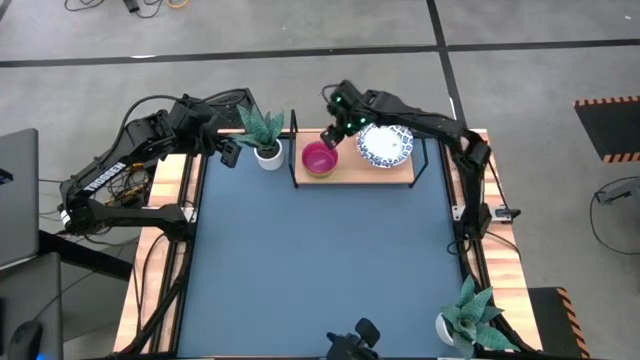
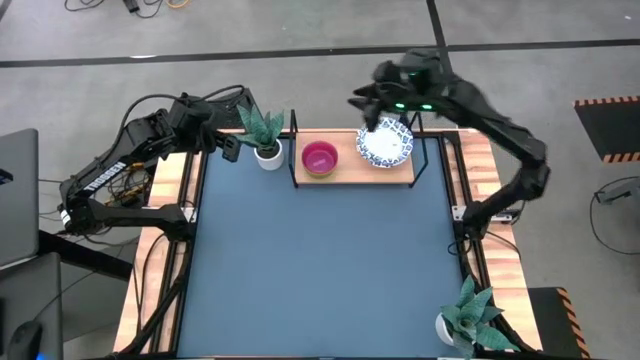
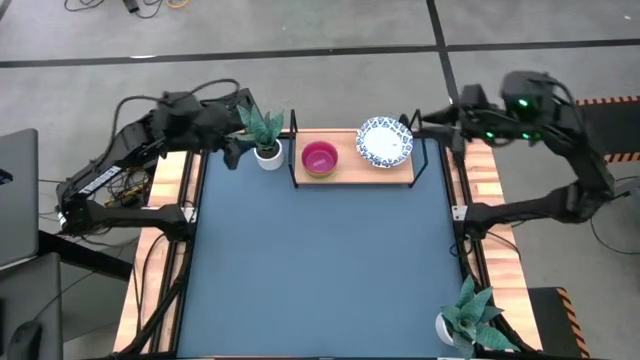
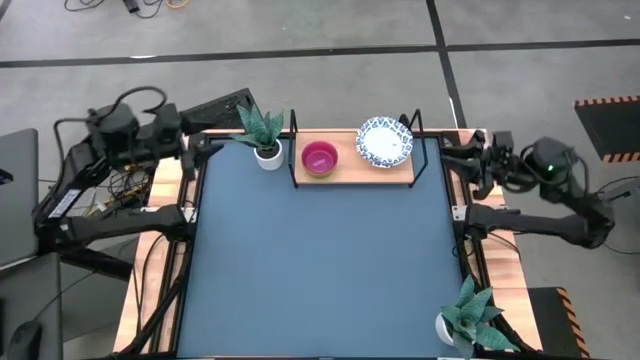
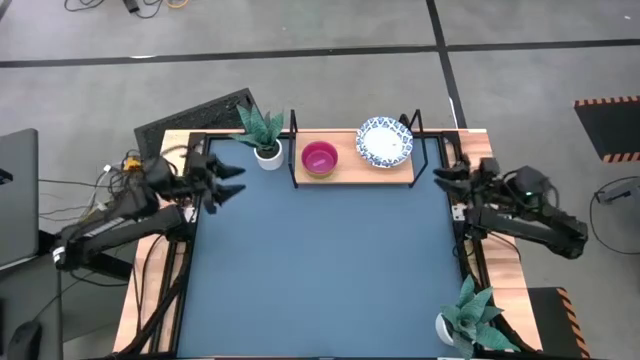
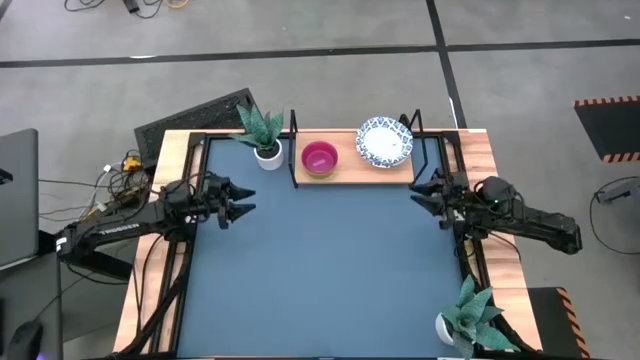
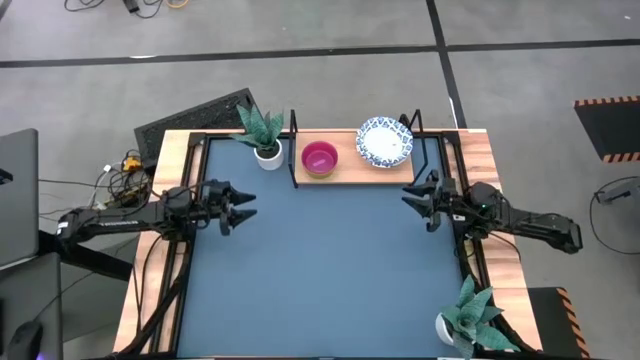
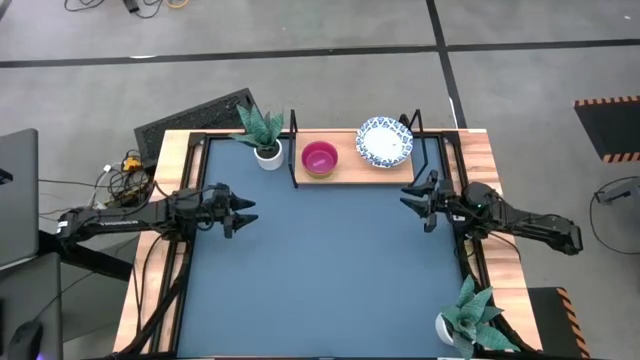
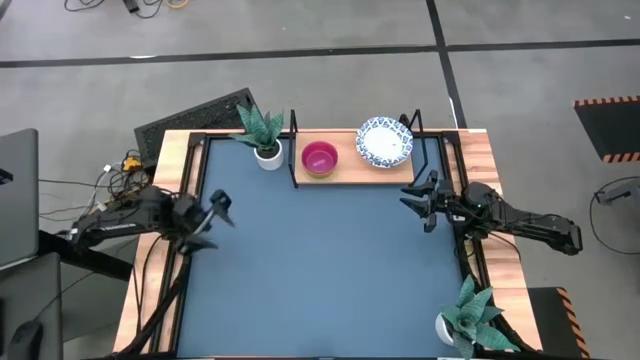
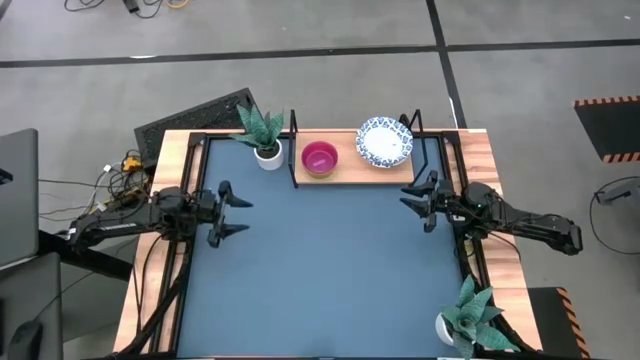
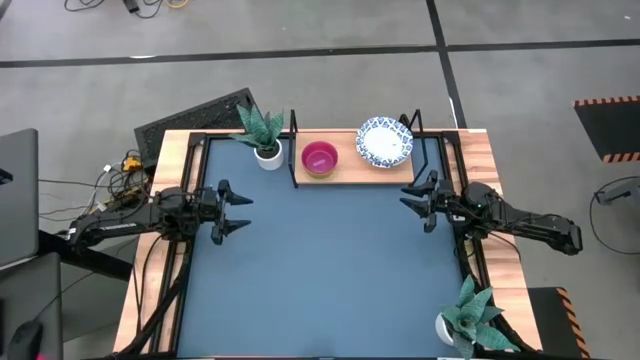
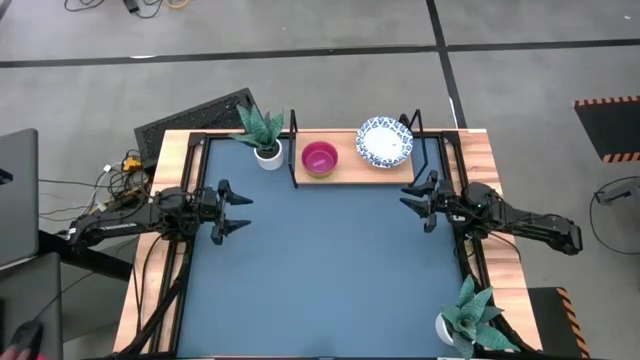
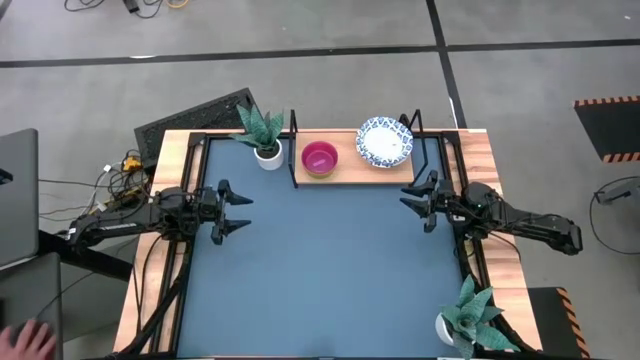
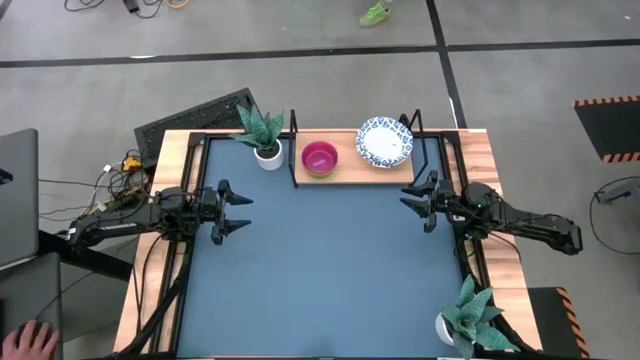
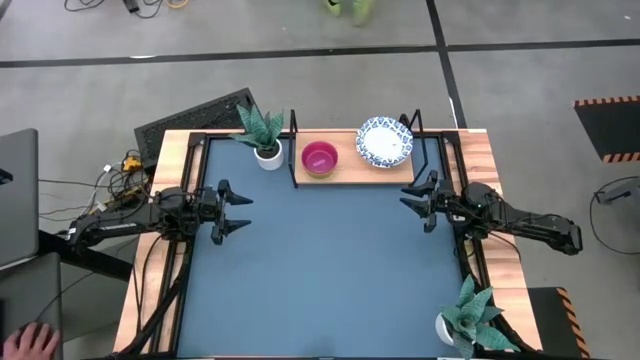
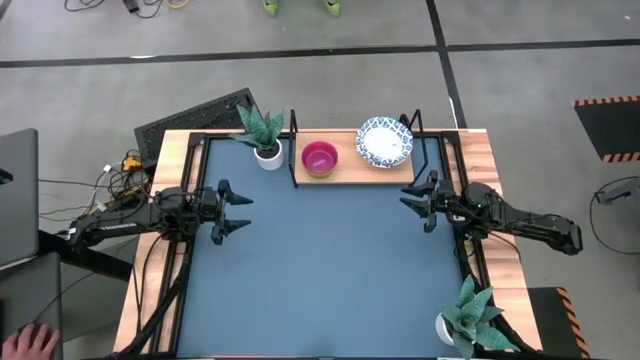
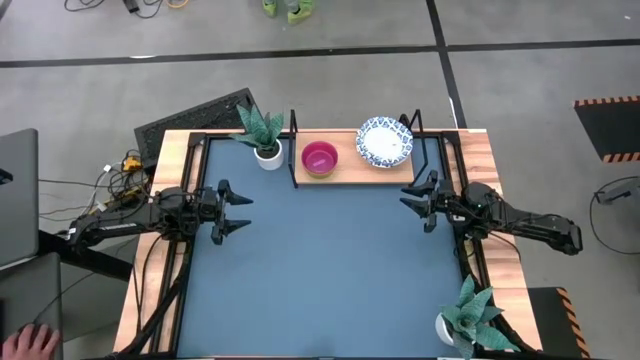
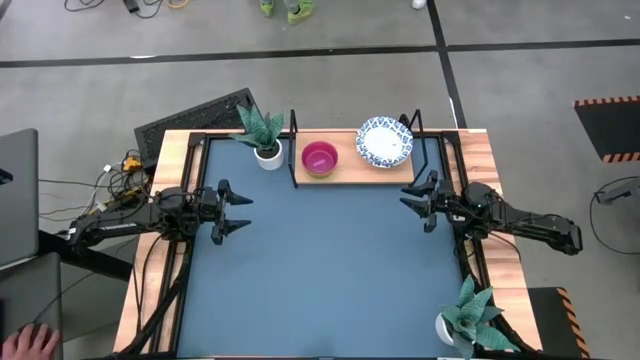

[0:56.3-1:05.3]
Task: Place and stack bowls onto a shelf
Return to Home Position

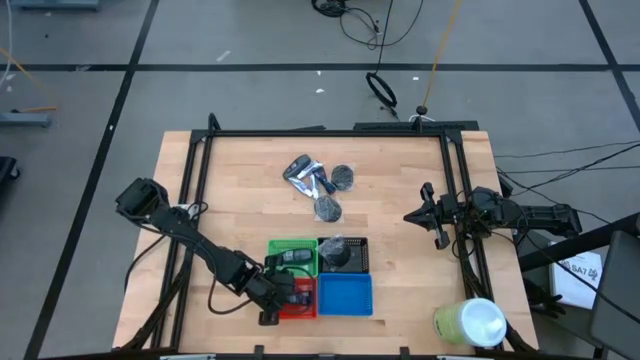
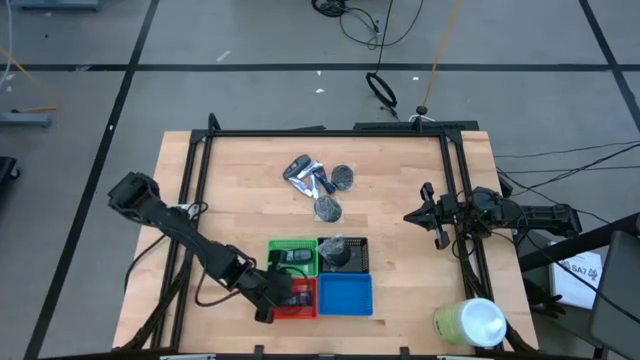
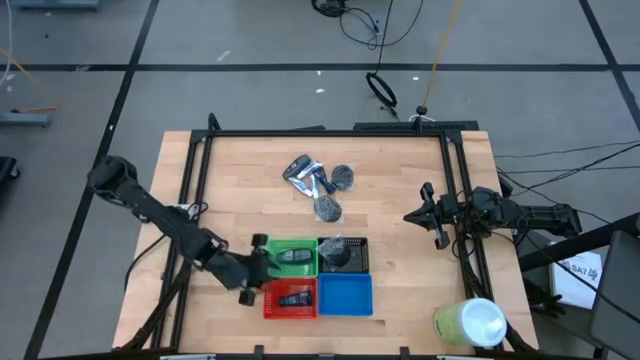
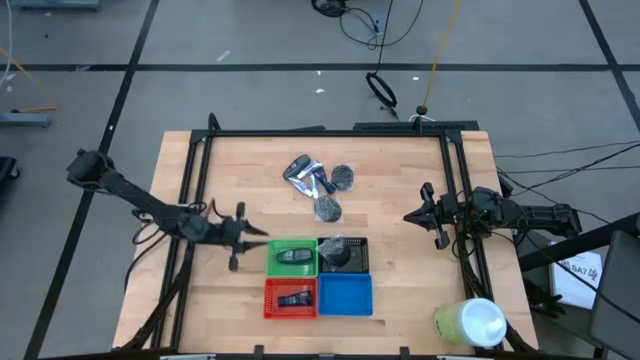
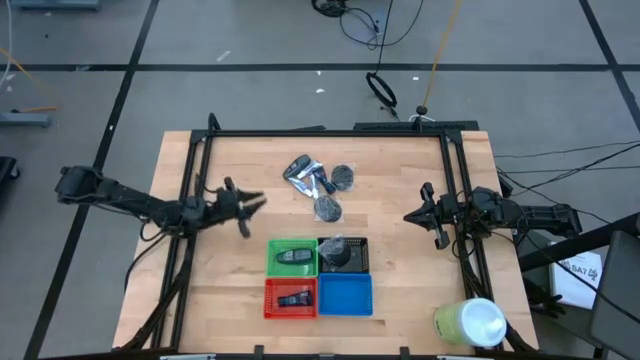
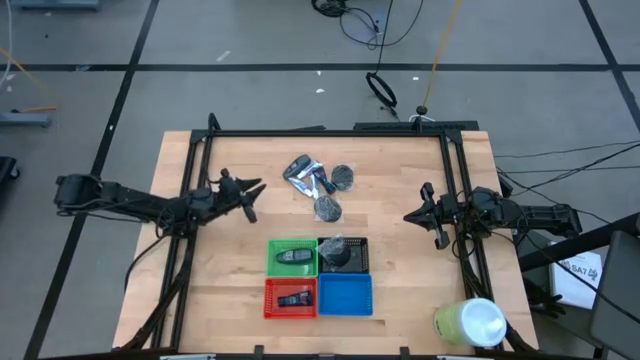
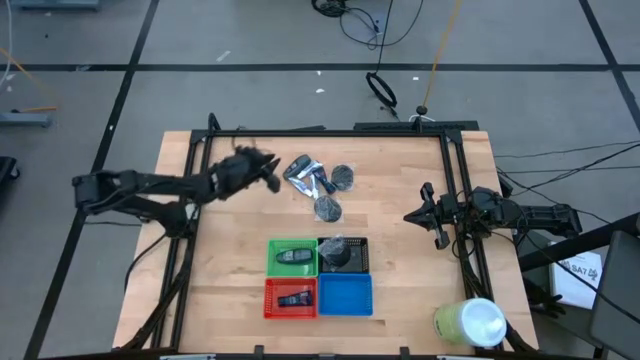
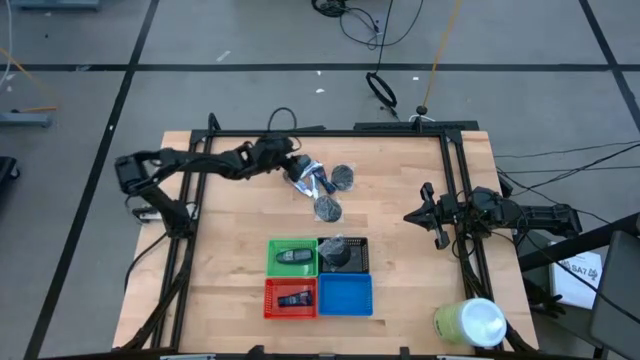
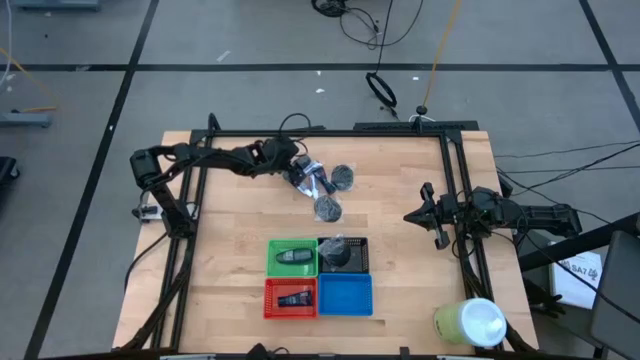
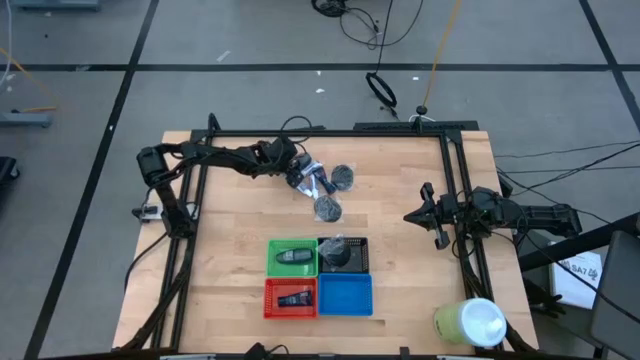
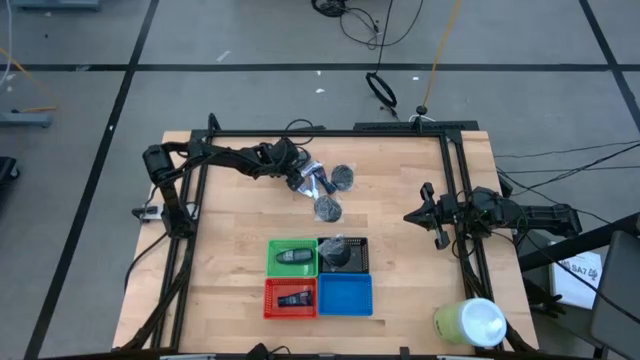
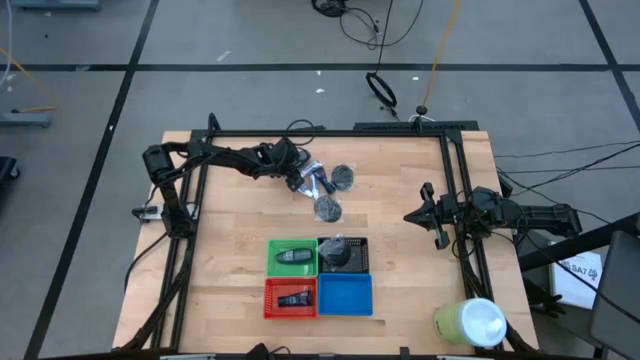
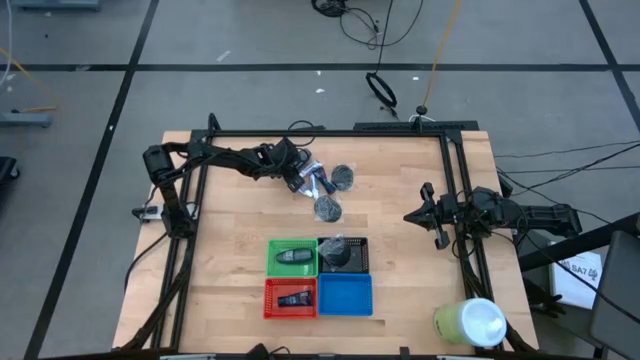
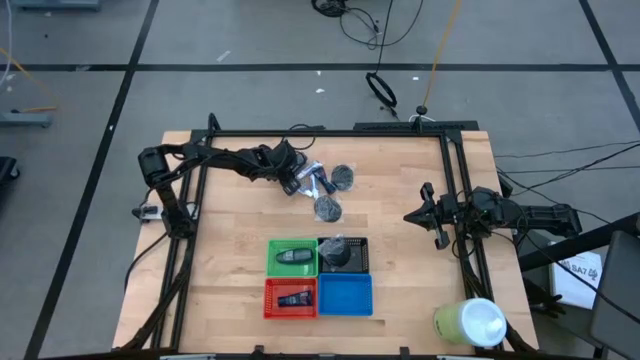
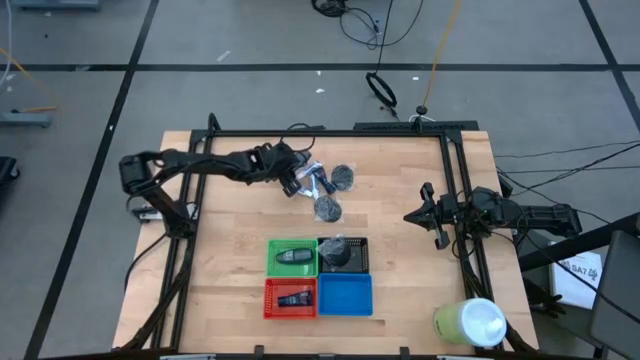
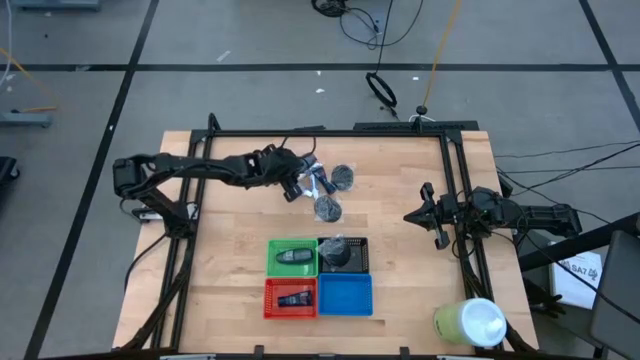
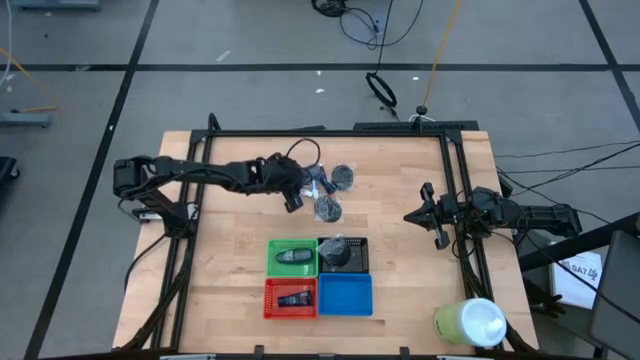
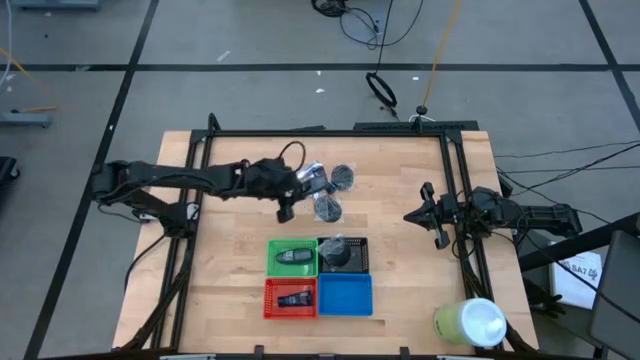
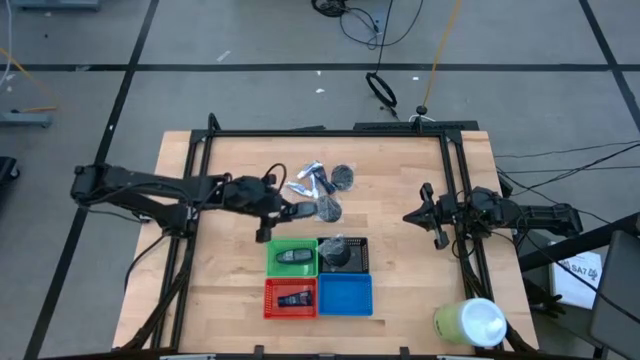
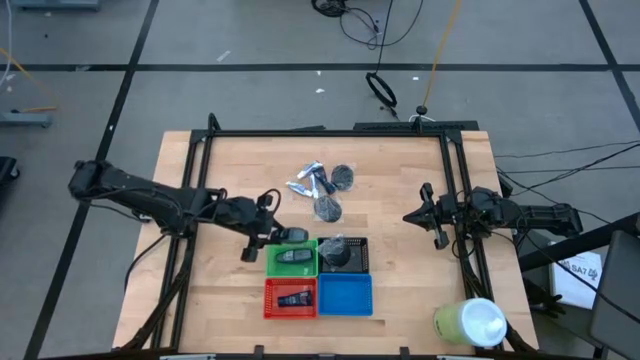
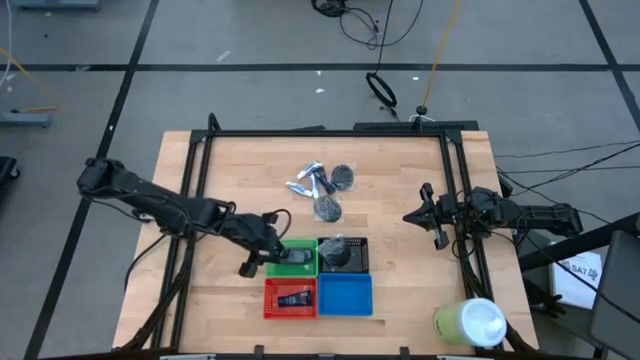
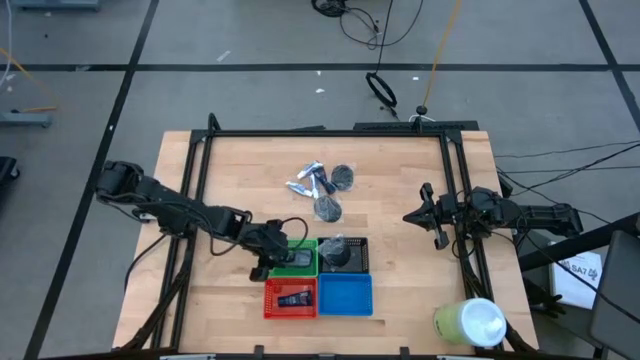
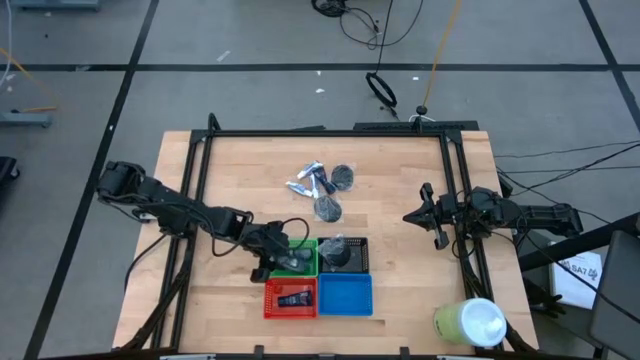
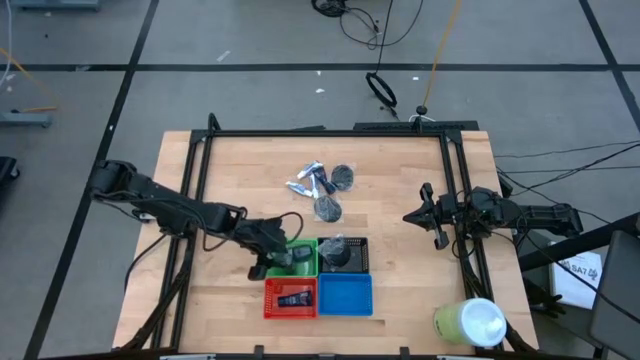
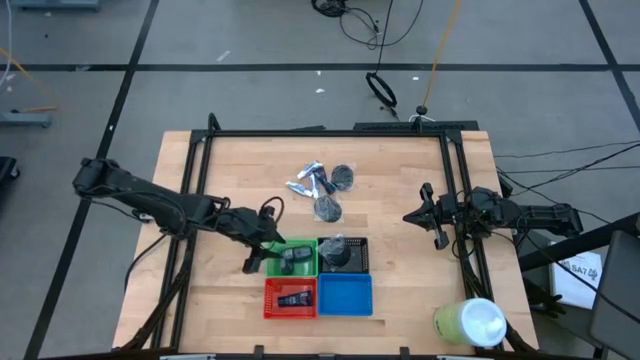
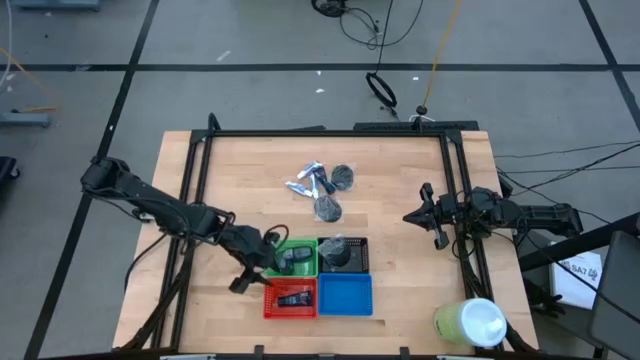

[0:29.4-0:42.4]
Task: Pick & Place Travel size toiletries
Put the black deodorant into the green bin
